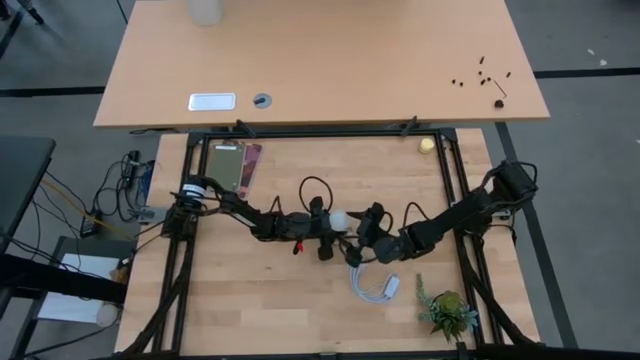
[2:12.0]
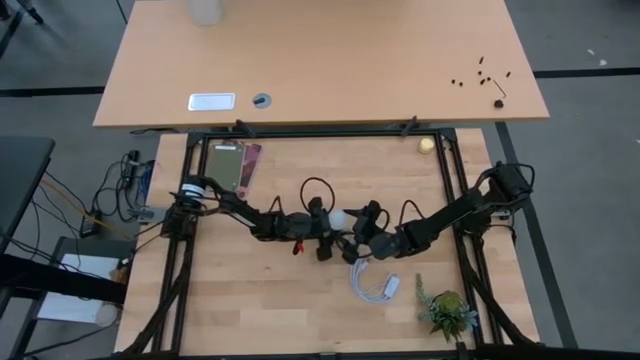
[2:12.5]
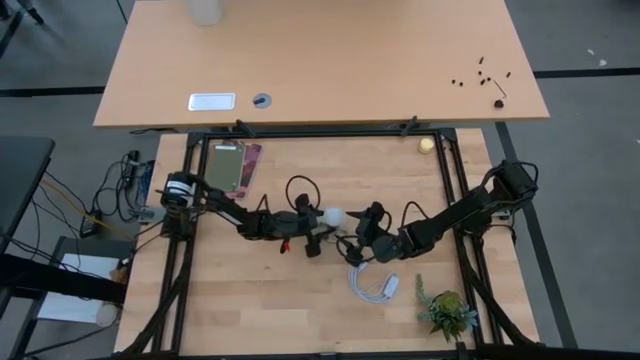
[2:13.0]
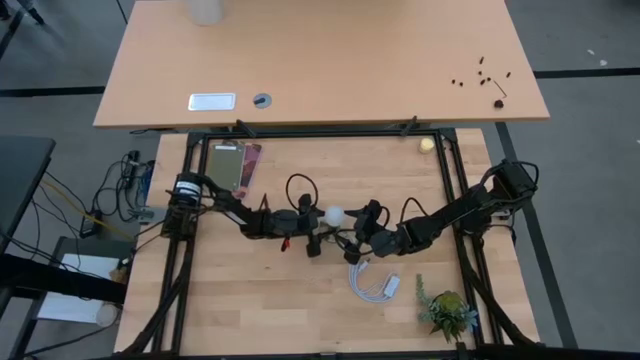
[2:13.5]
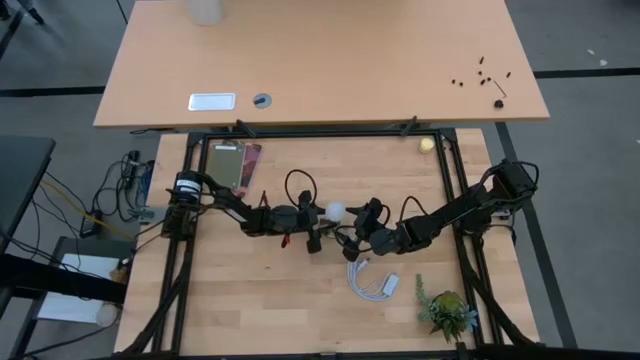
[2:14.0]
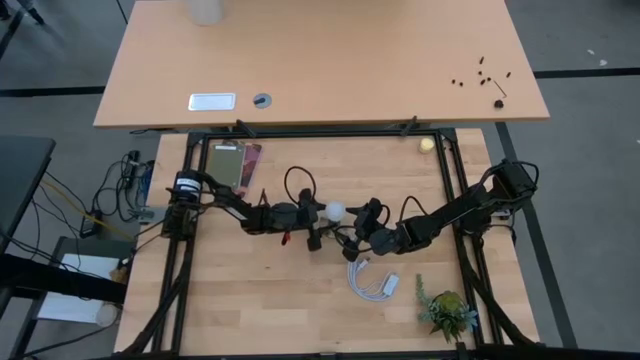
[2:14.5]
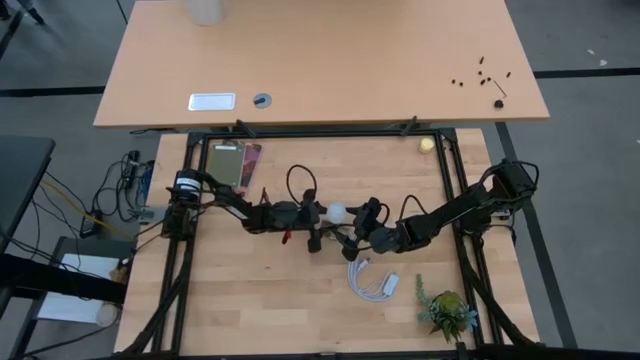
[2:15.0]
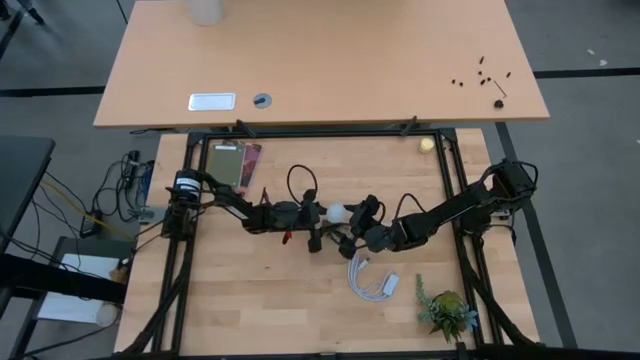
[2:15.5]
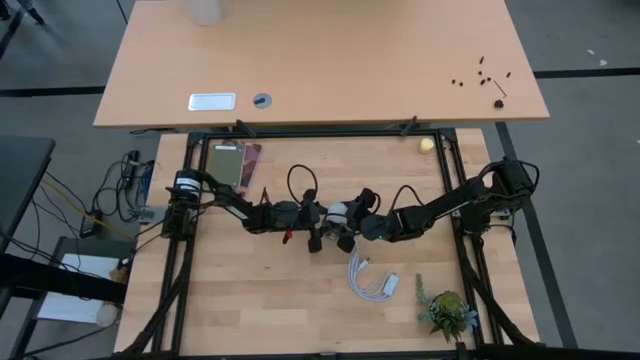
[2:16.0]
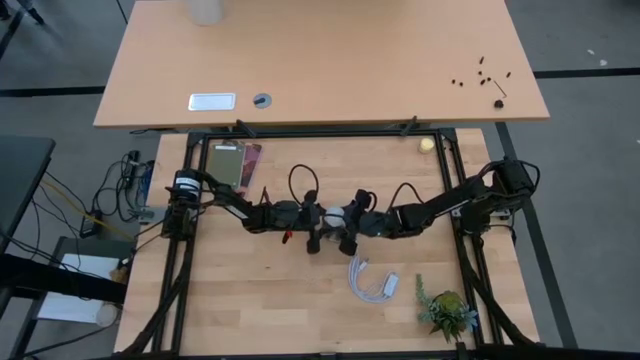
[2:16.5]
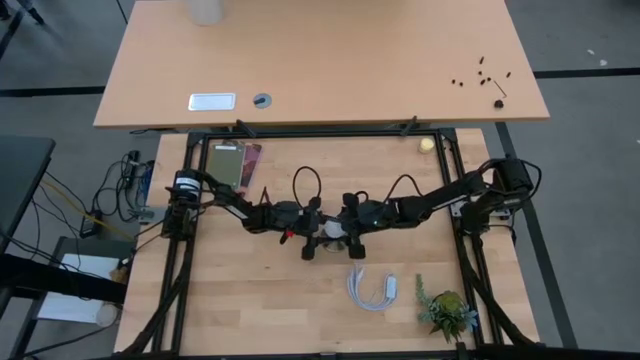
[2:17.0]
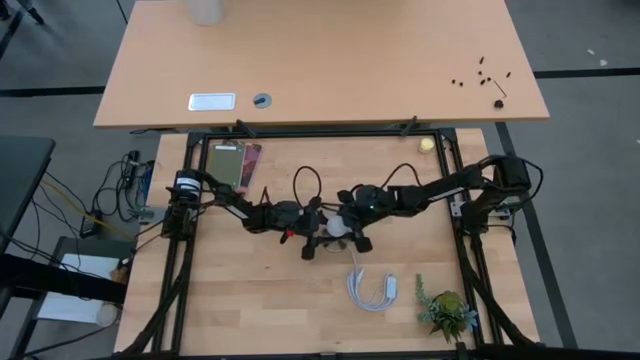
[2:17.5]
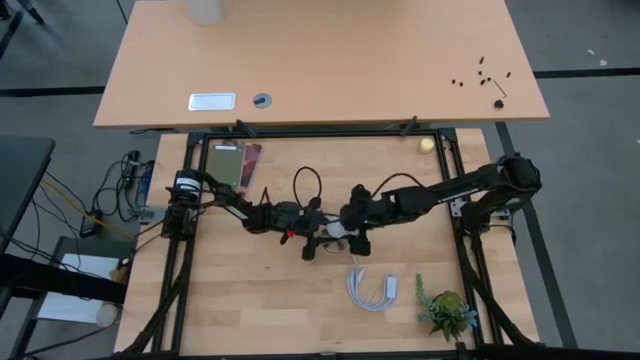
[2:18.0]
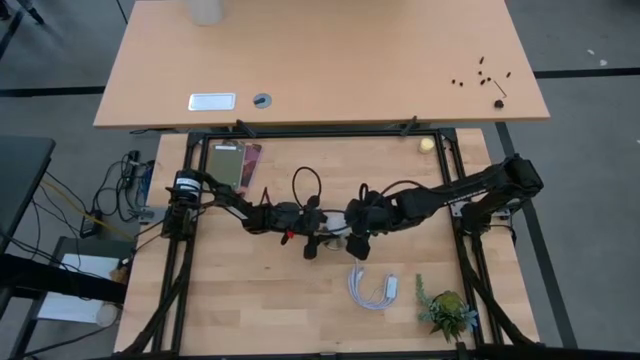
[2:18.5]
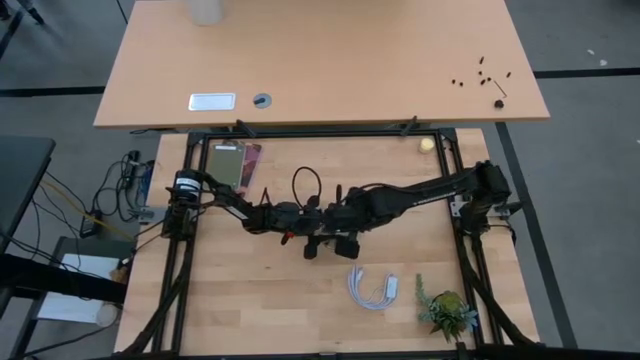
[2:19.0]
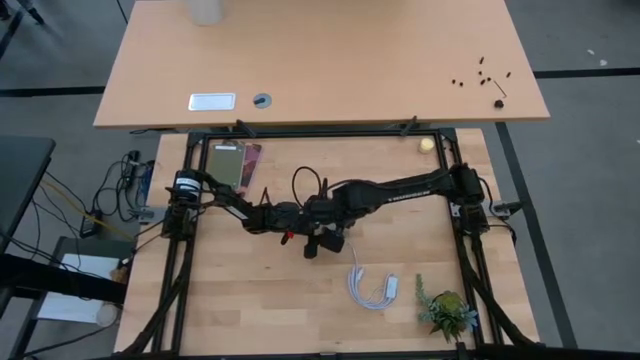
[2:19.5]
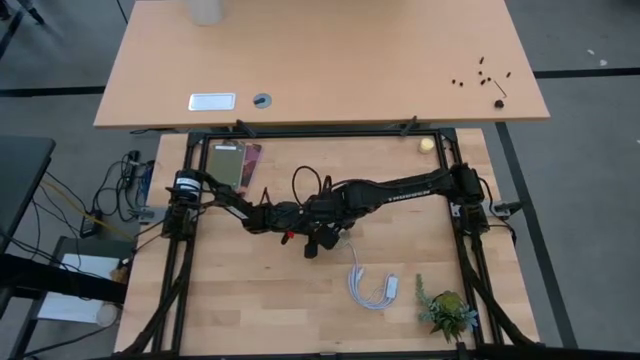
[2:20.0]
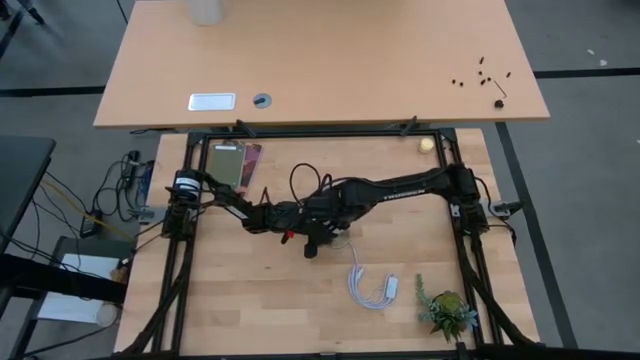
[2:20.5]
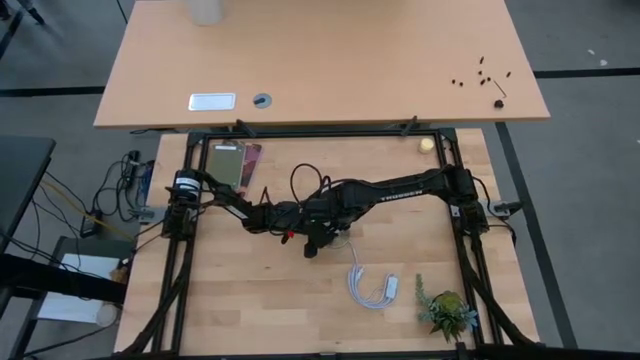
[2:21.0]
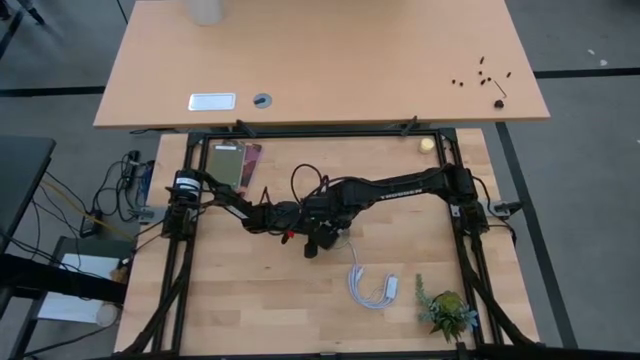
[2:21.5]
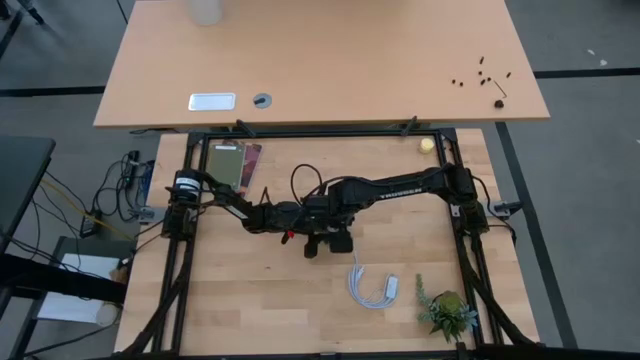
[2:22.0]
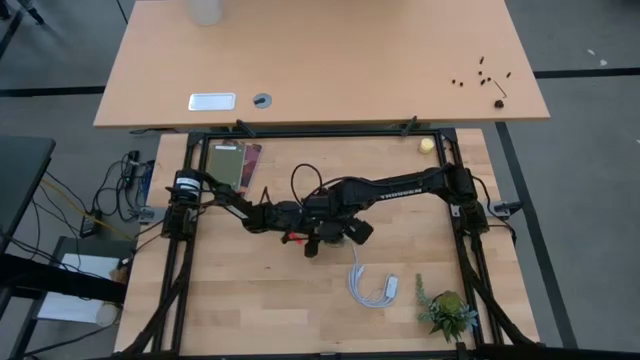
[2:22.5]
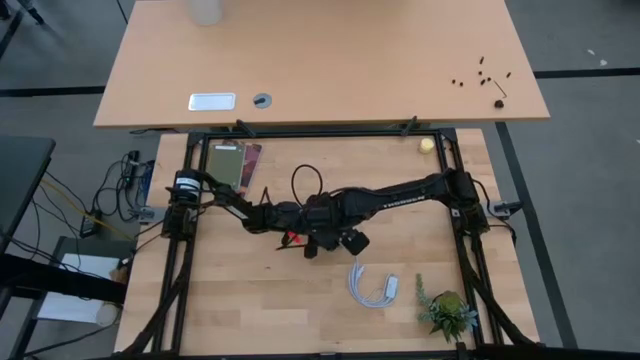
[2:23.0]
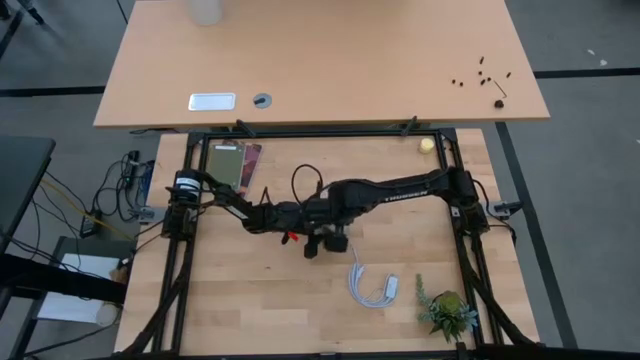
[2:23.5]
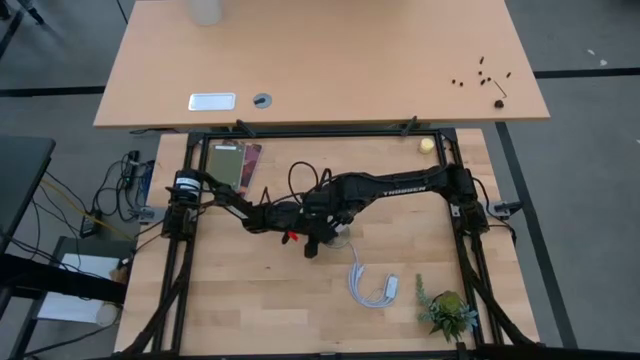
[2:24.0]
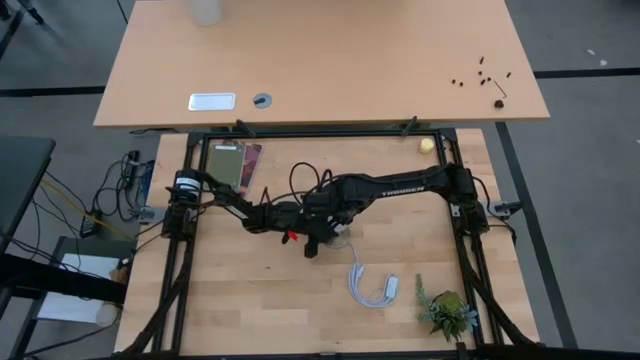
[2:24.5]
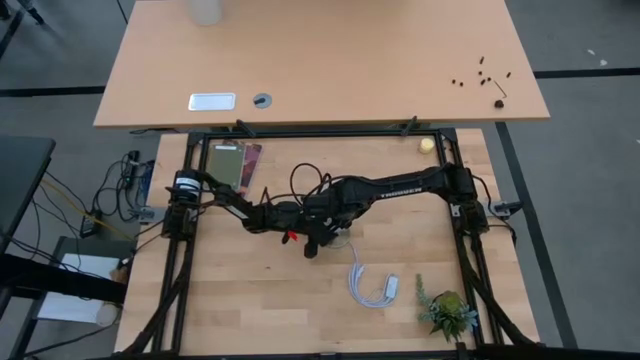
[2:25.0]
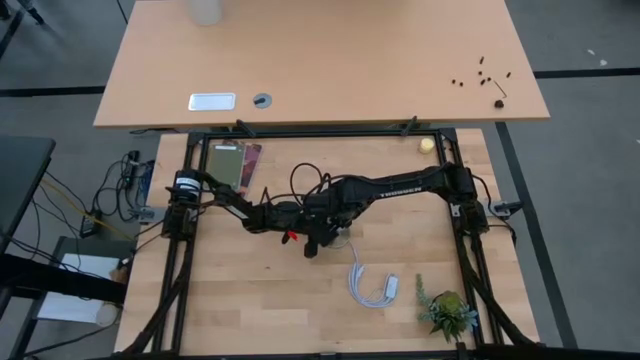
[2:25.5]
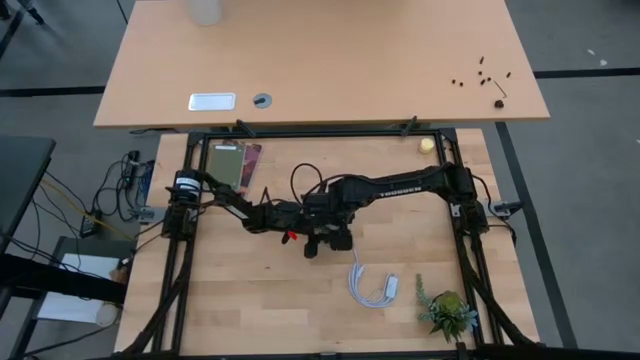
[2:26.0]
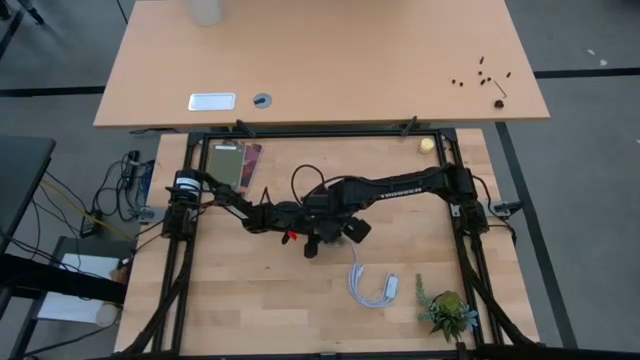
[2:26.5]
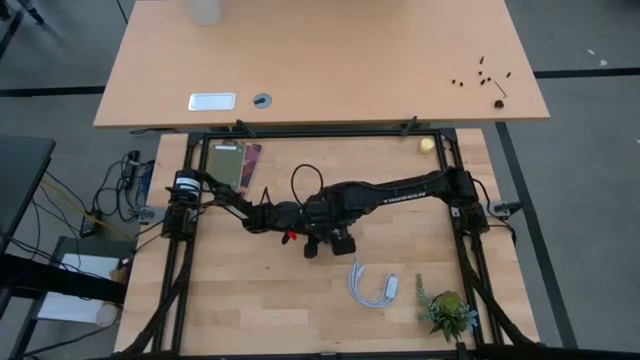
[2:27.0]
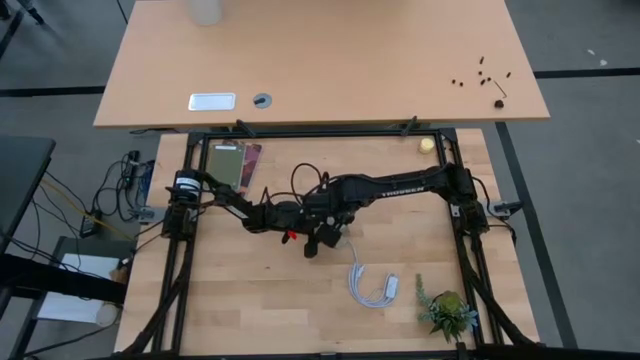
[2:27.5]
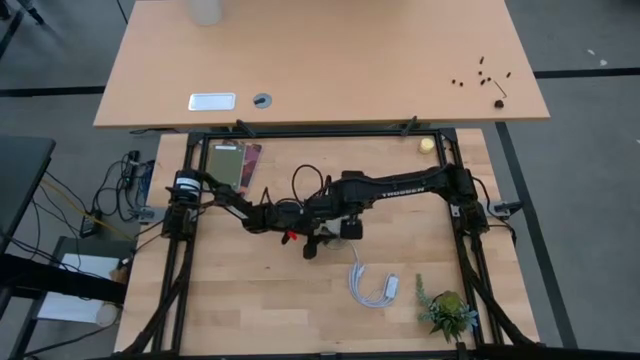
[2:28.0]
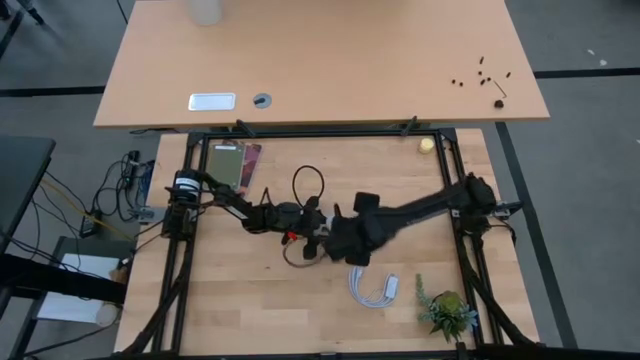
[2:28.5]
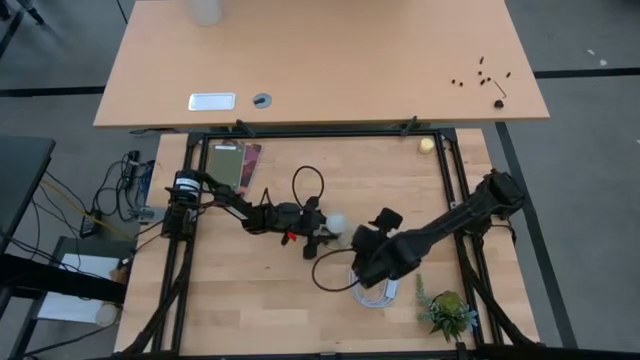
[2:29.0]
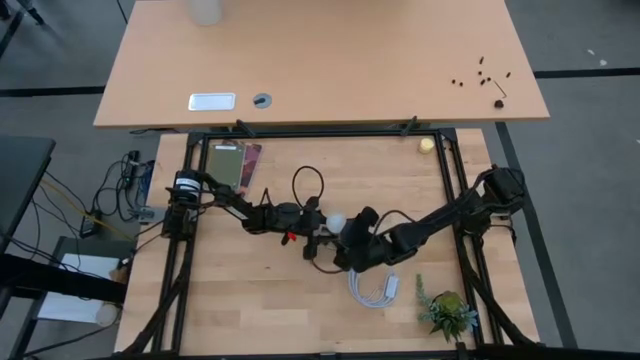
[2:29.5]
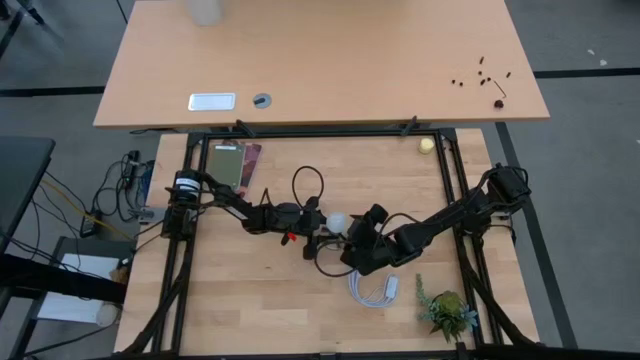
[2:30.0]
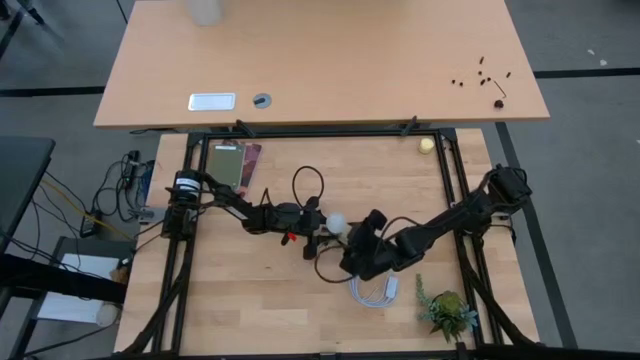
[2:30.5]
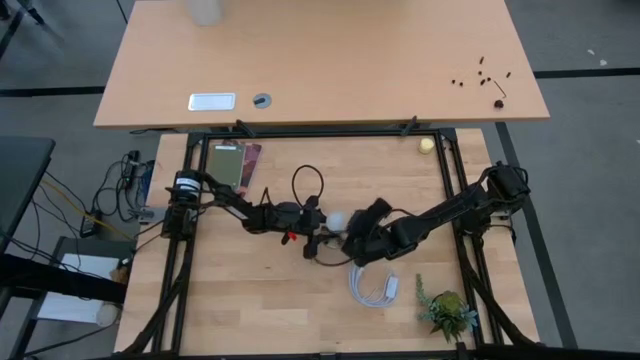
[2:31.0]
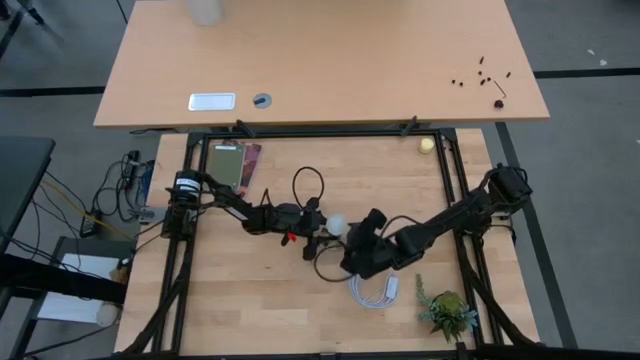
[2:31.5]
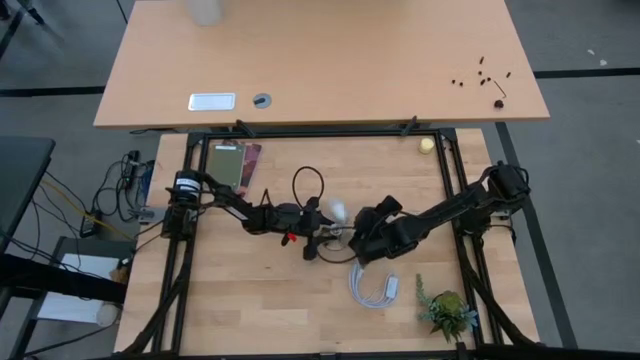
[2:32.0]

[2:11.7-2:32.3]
Task: Screw lightbulb
Remove the white lightbulb from the desk lamp
